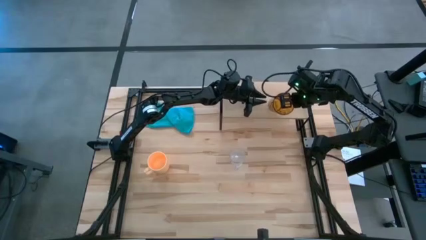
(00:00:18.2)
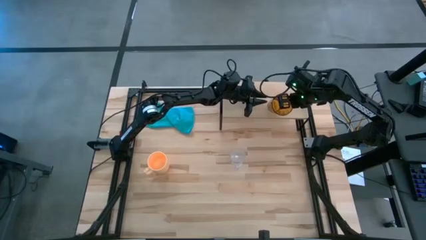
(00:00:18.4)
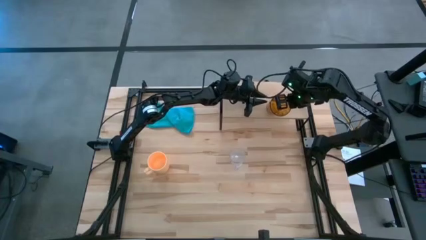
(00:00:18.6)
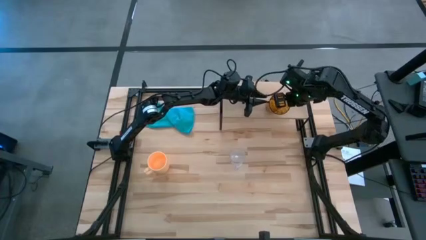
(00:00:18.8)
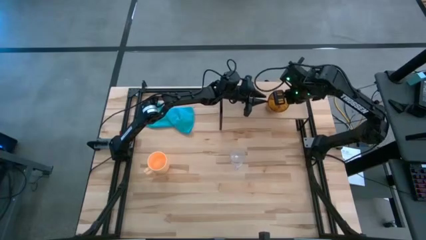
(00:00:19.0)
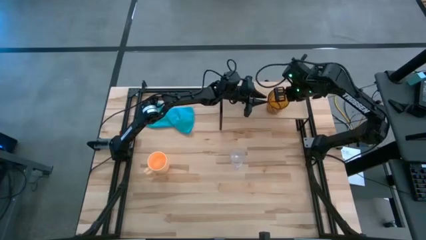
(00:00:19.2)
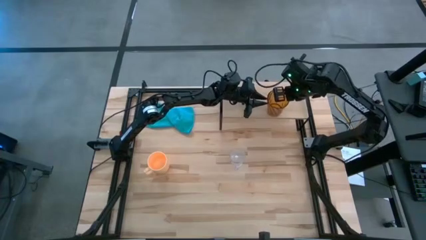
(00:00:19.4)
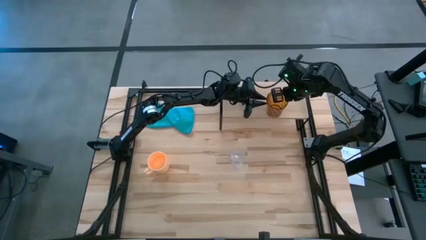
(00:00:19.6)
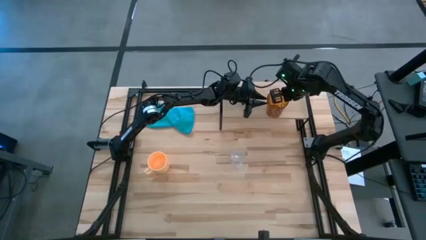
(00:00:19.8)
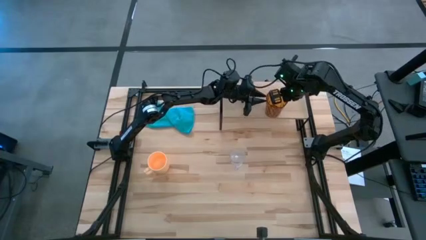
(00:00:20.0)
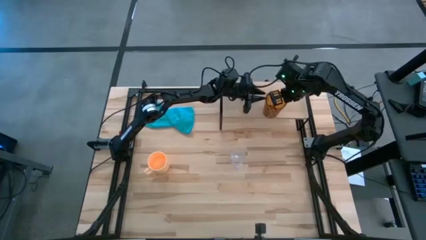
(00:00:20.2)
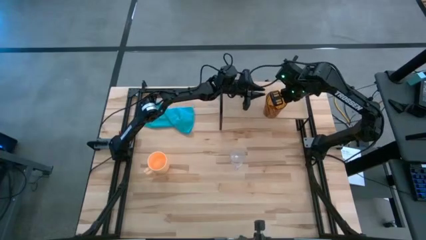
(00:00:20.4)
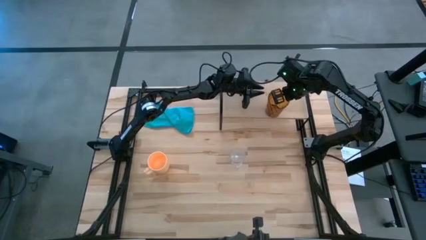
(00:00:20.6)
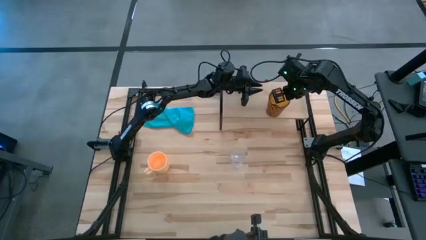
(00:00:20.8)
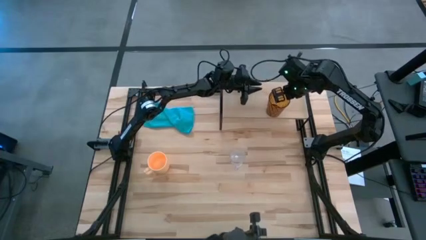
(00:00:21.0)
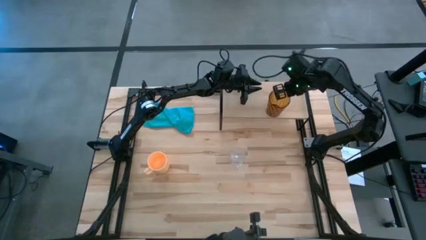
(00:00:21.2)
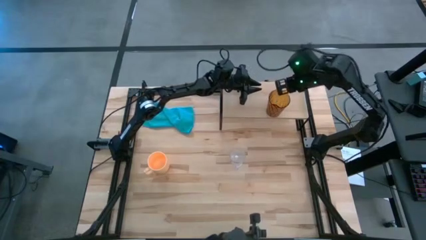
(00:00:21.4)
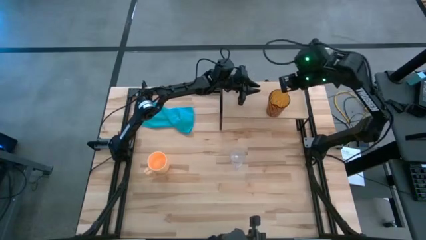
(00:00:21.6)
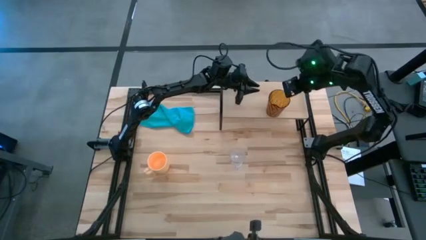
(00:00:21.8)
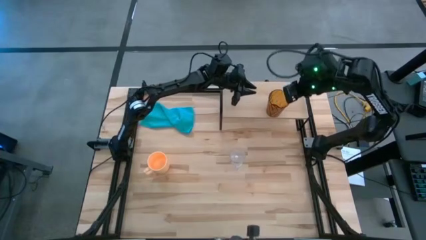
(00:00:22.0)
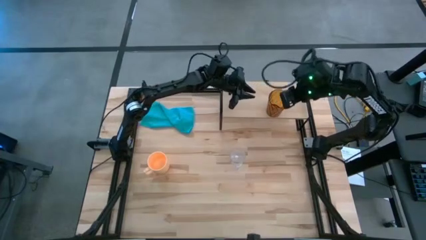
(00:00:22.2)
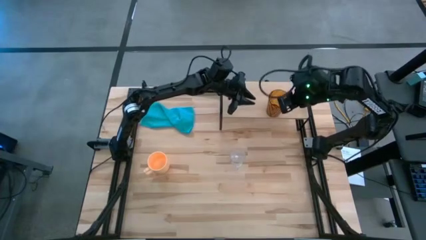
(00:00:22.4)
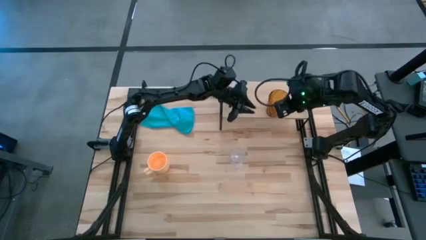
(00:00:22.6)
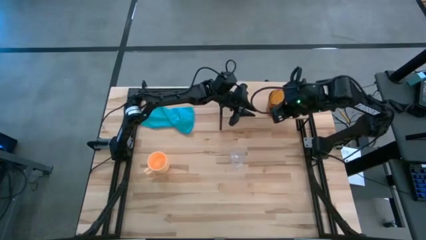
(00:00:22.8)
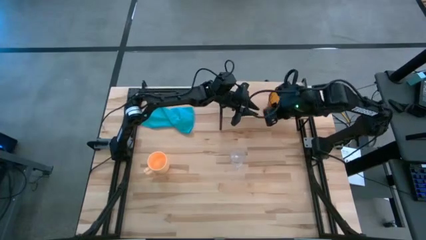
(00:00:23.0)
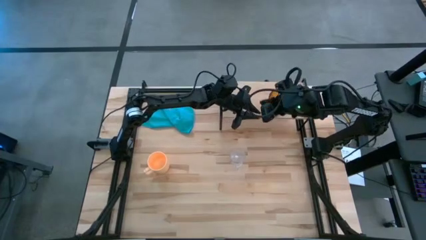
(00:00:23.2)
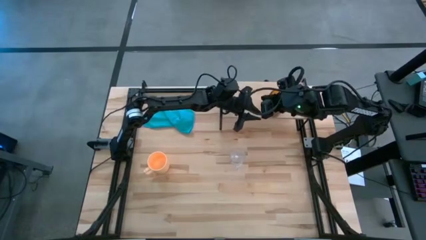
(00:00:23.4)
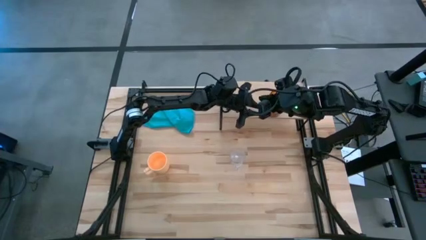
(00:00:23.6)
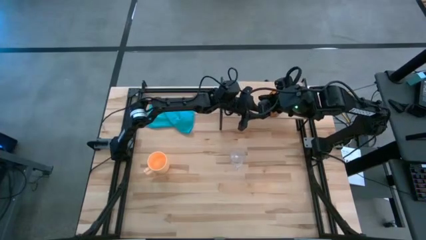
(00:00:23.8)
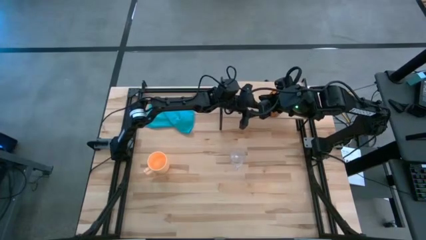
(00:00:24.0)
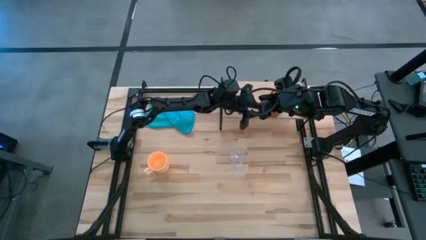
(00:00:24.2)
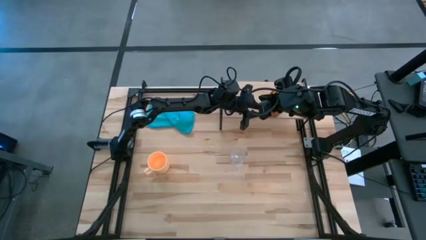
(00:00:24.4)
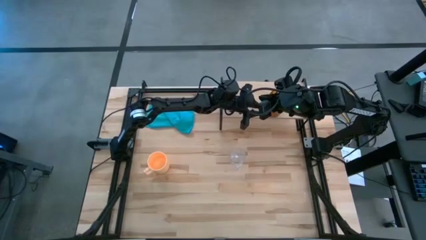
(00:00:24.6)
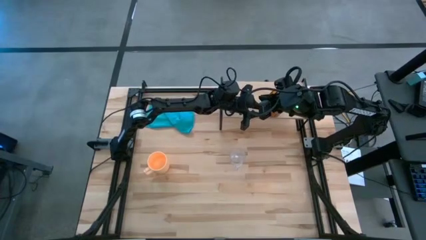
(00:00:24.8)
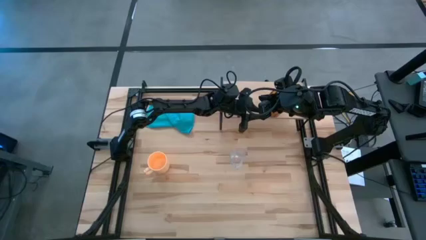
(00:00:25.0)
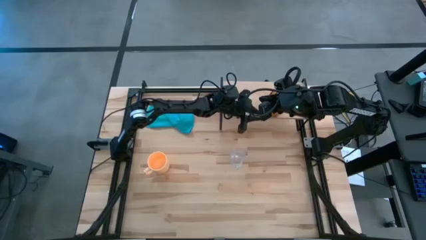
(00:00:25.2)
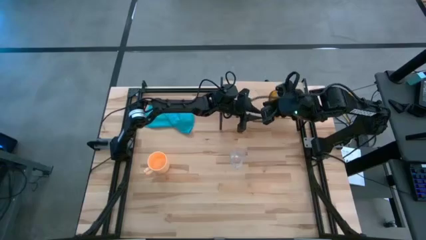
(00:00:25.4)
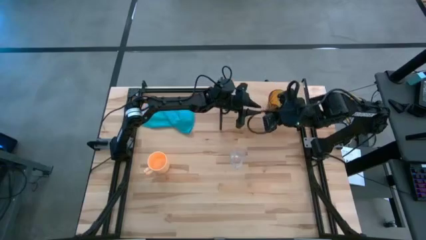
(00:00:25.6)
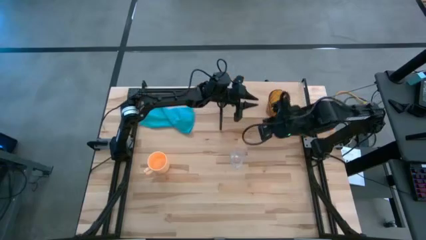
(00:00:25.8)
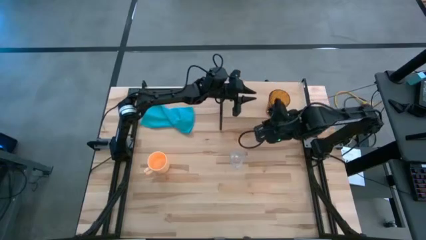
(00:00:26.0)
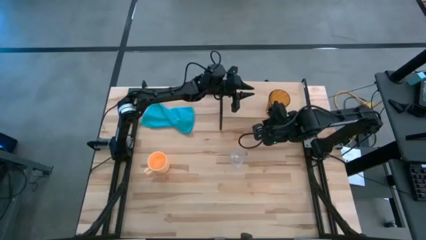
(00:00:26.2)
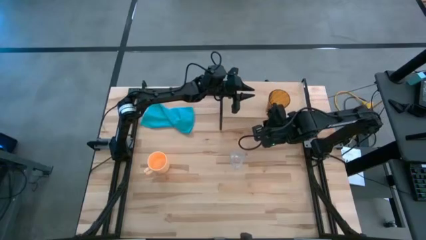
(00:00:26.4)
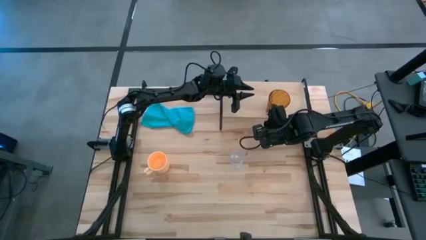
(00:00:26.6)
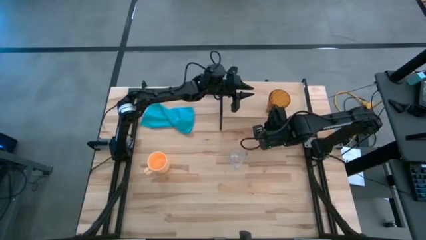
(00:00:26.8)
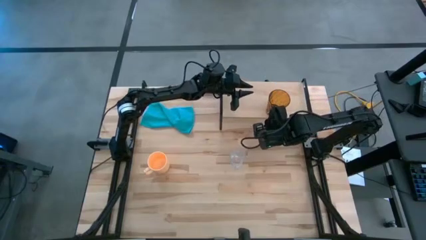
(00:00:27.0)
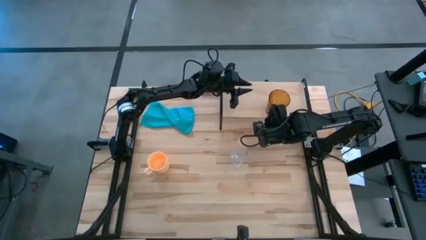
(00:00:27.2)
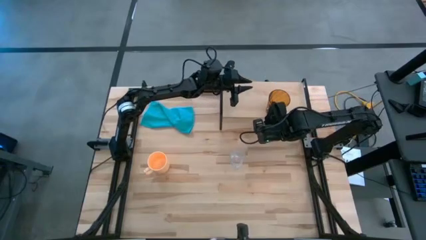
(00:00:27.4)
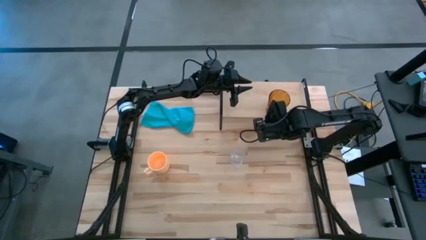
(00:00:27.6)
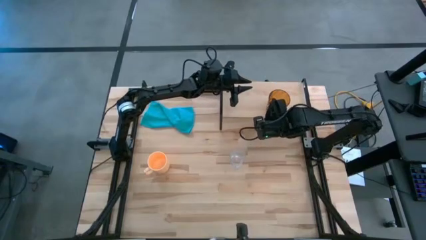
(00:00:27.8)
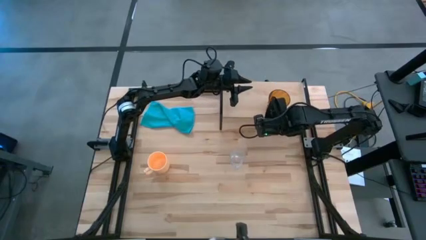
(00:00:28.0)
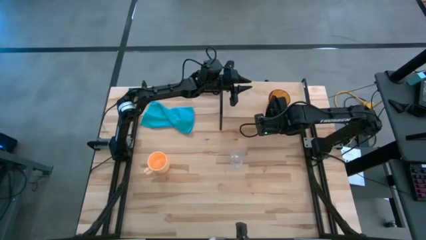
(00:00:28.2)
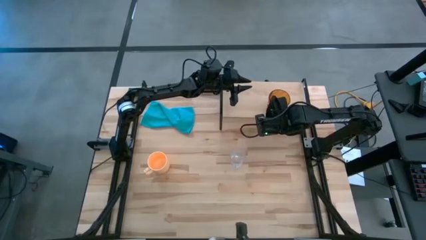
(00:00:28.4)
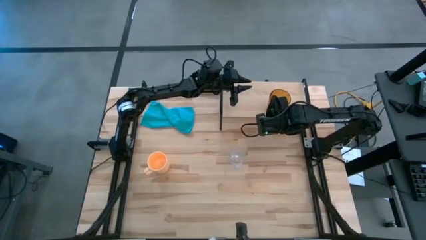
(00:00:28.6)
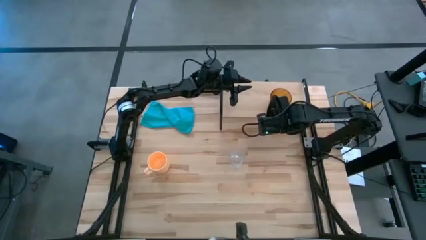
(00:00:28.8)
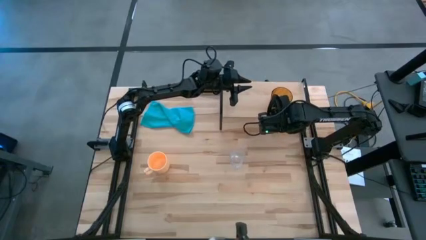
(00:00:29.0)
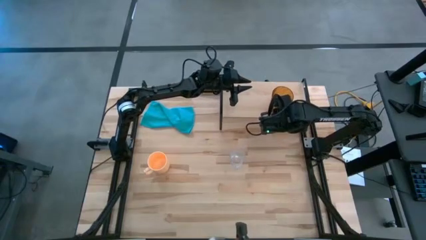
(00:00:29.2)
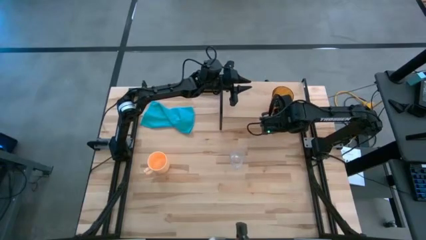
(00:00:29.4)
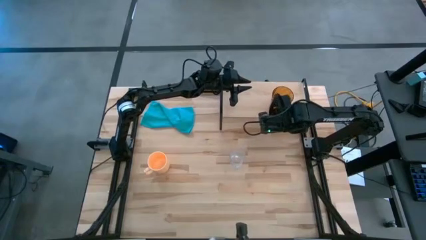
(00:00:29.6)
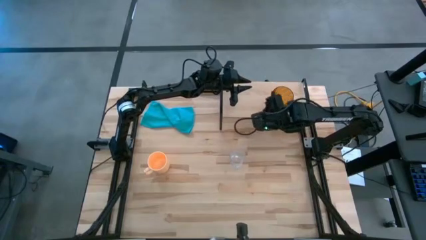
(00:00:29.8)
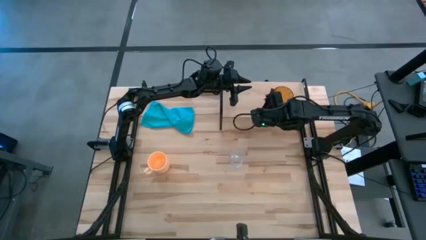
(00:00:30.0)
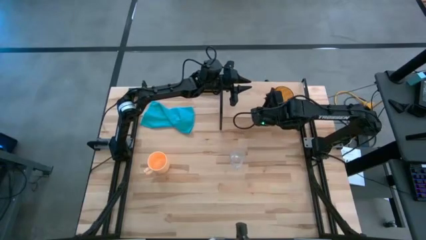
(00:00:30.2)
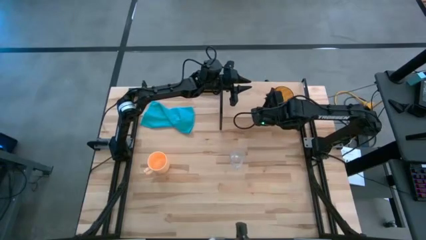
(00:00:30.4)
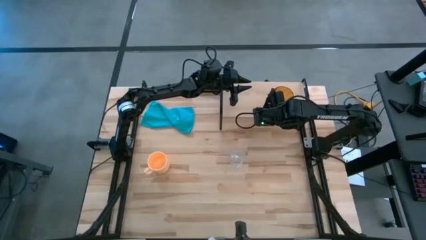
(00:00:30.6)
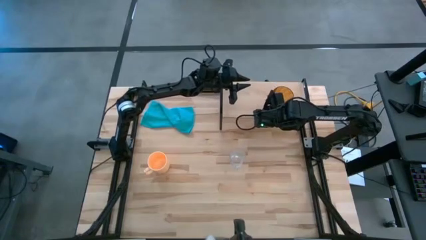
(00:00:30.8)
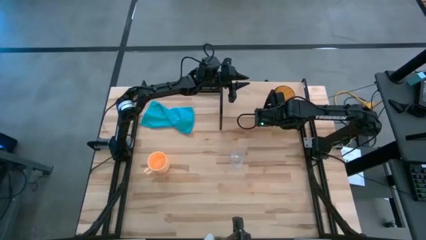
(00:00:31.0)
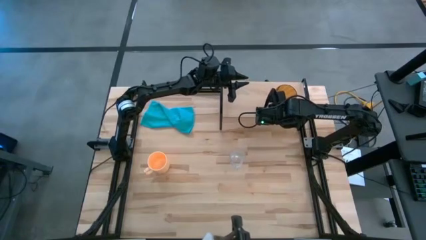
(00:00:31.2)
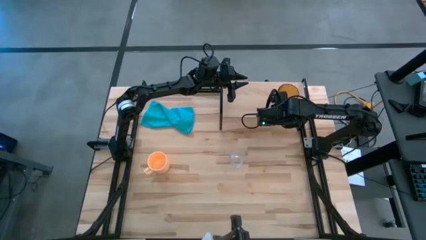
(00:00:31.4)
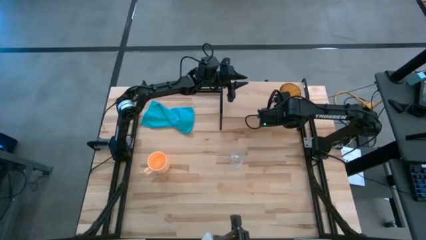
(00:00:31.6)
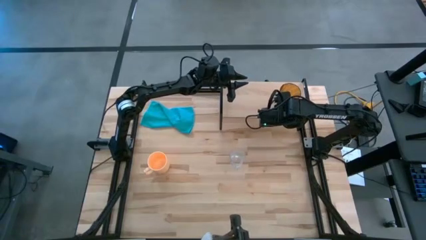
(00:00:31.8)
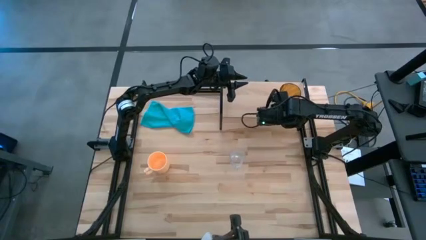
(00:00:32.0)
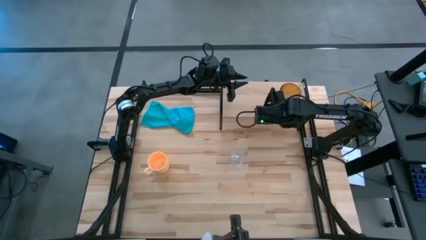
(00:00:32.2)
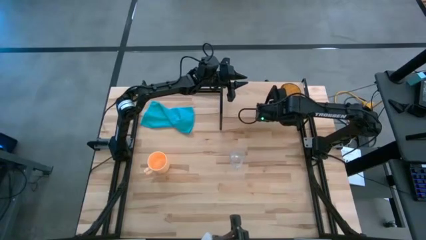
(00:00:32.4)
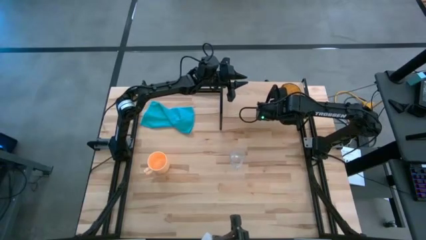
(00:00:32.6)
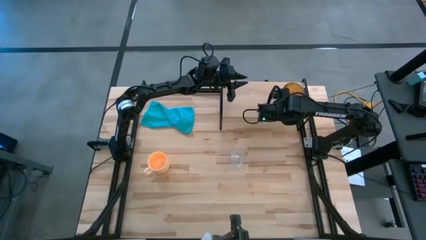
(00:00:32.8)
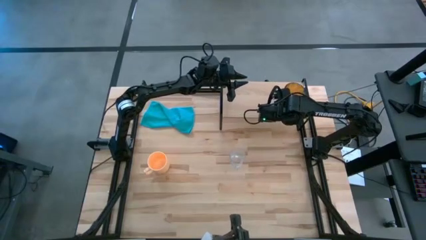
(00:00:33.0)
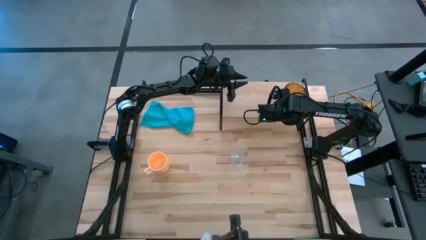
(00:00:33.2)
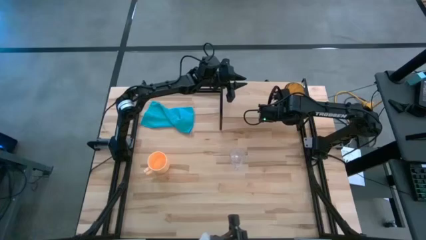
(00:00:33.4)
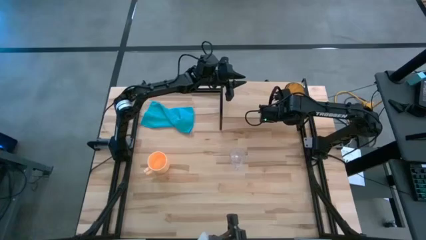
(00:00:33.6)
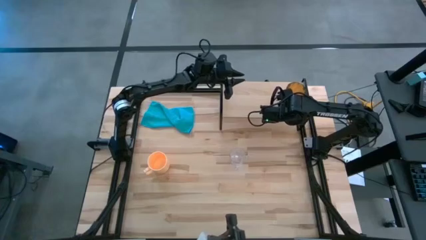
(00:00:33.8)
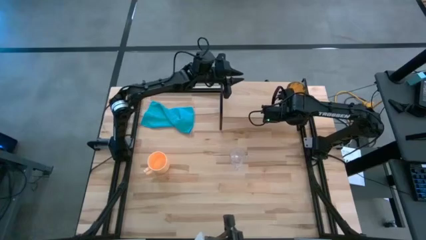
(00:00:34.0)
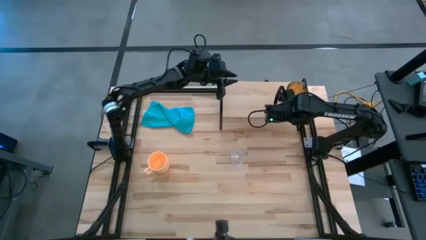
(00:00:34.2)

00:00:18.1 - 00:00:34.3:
Task: Stack small to large cups/mugs on shelf
Put the brown glass on the shelf
